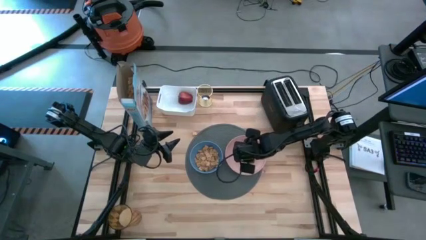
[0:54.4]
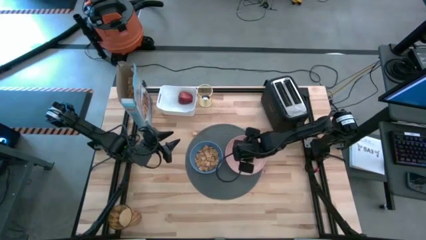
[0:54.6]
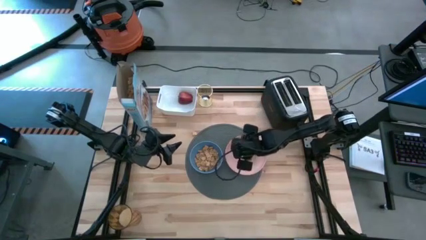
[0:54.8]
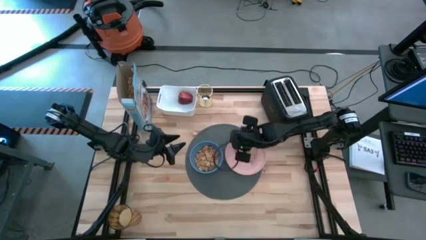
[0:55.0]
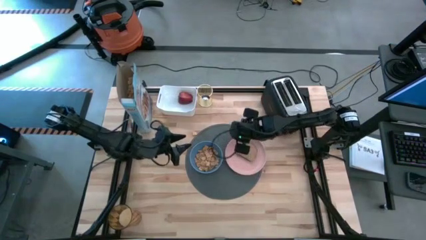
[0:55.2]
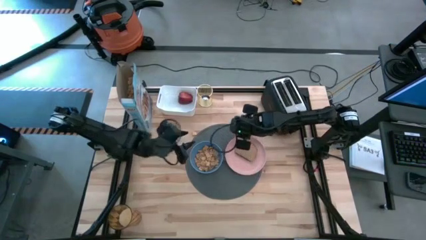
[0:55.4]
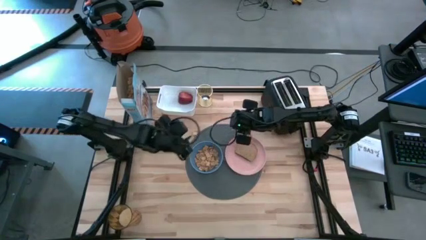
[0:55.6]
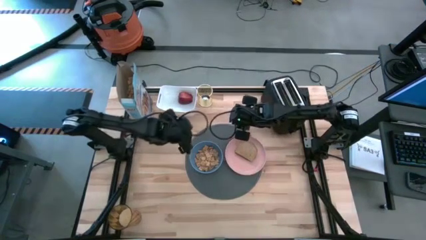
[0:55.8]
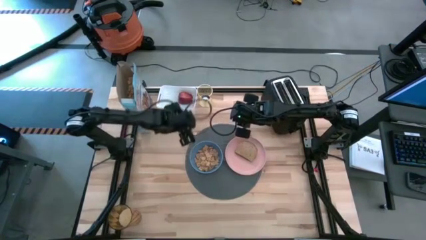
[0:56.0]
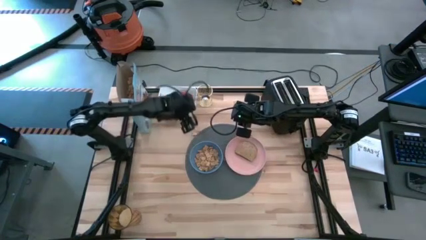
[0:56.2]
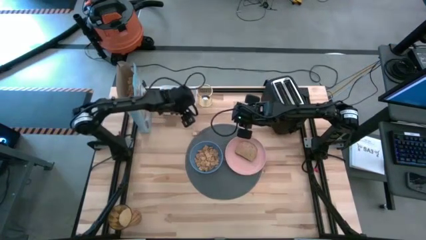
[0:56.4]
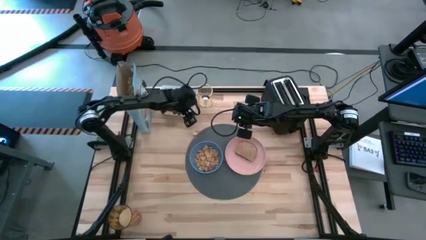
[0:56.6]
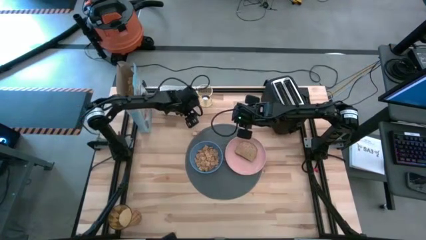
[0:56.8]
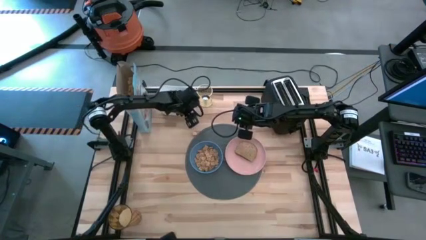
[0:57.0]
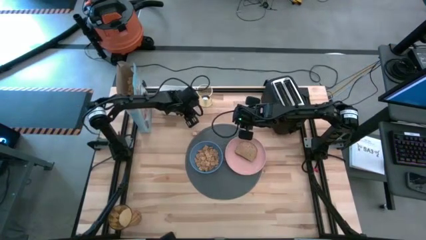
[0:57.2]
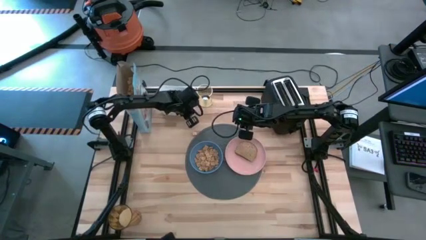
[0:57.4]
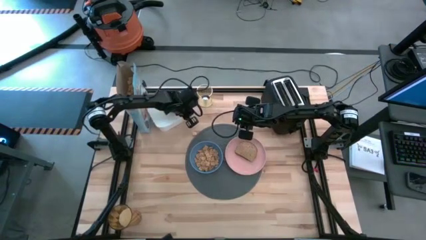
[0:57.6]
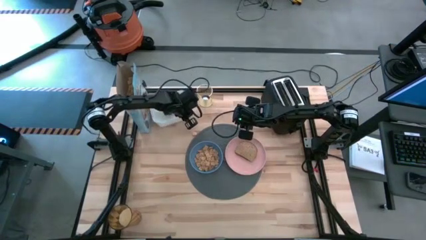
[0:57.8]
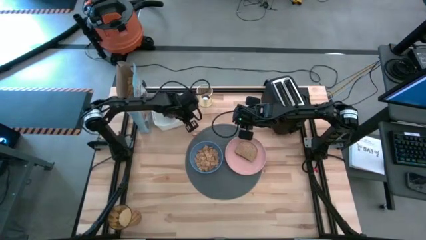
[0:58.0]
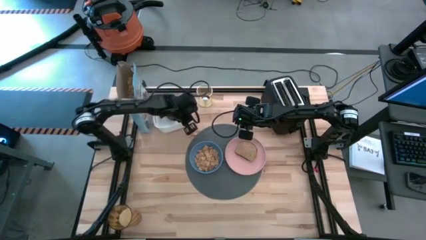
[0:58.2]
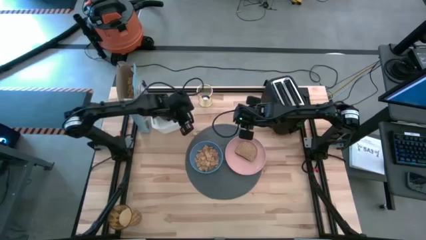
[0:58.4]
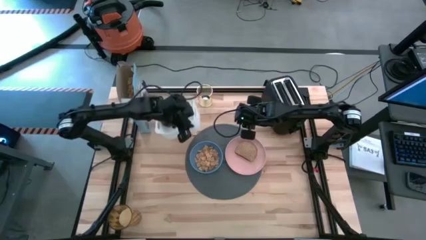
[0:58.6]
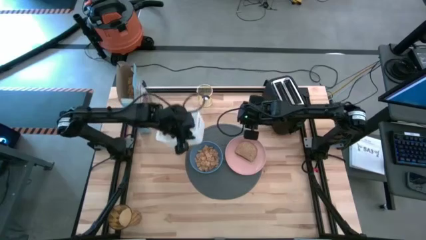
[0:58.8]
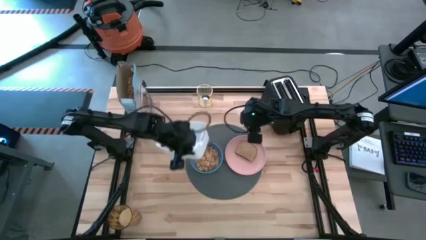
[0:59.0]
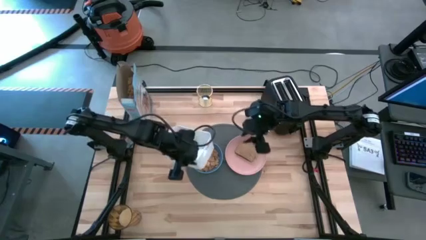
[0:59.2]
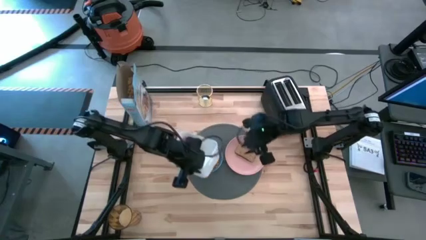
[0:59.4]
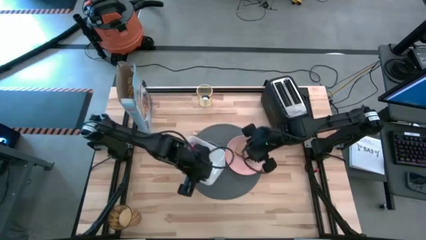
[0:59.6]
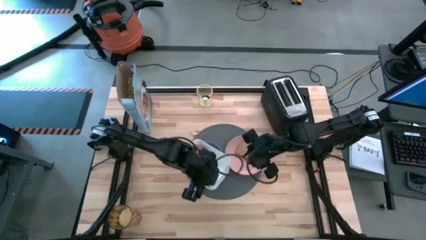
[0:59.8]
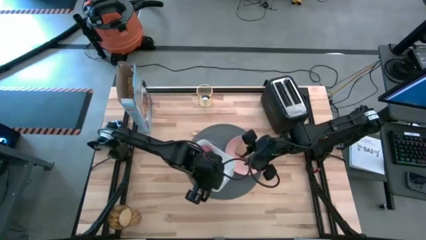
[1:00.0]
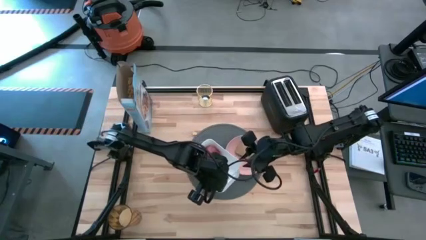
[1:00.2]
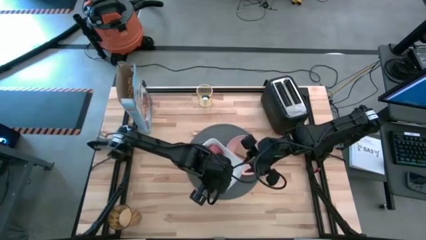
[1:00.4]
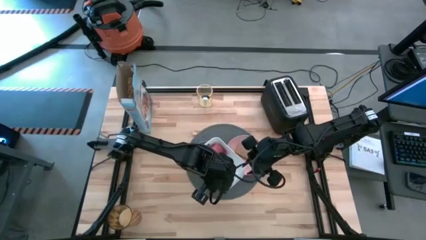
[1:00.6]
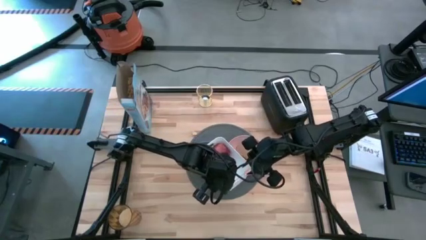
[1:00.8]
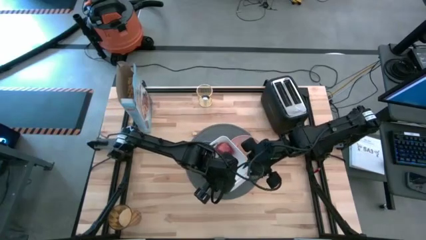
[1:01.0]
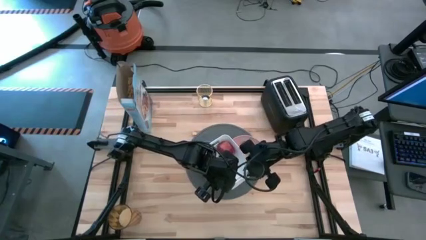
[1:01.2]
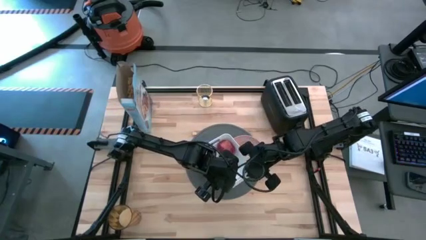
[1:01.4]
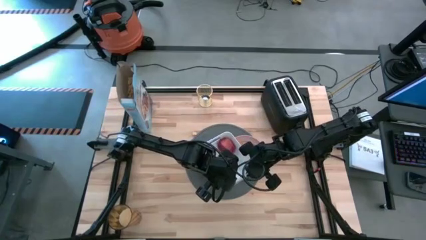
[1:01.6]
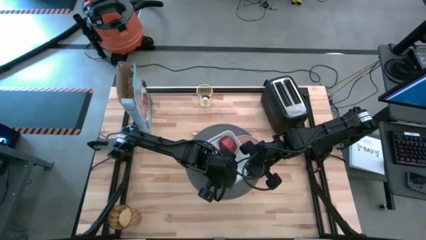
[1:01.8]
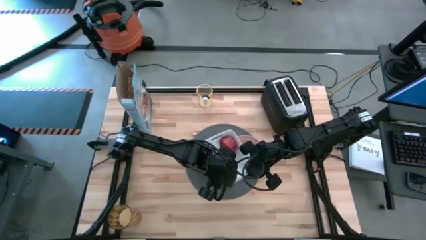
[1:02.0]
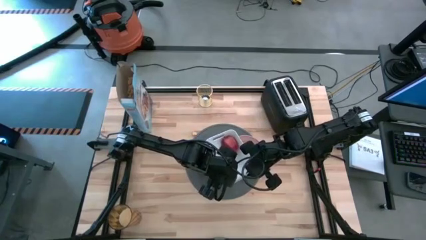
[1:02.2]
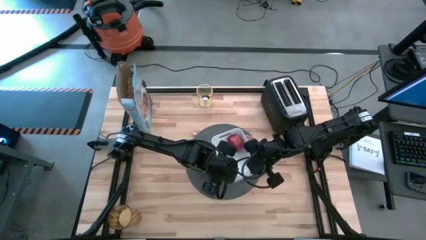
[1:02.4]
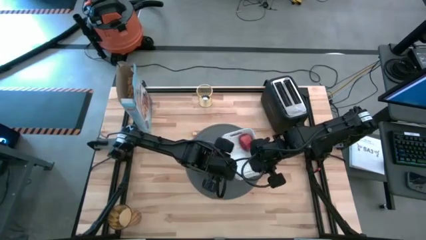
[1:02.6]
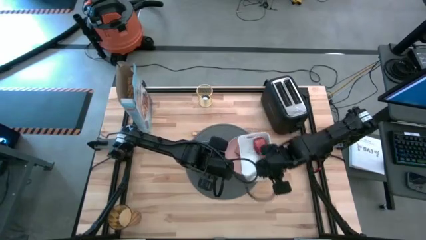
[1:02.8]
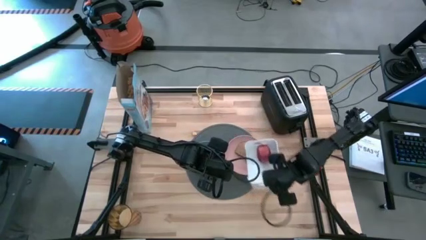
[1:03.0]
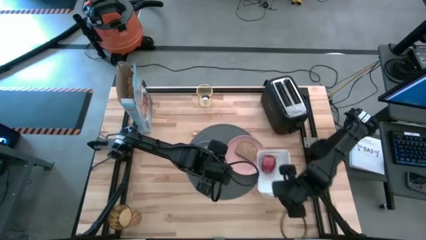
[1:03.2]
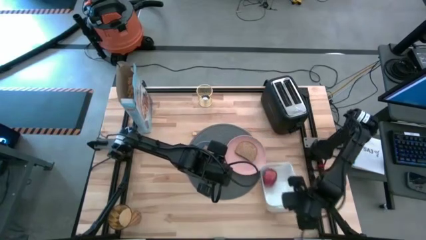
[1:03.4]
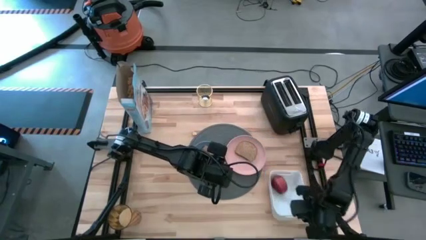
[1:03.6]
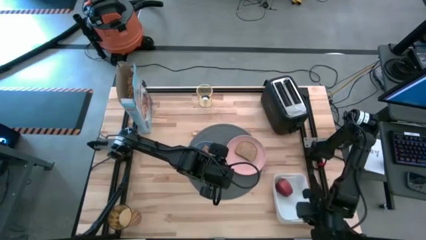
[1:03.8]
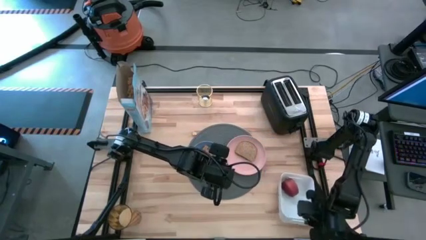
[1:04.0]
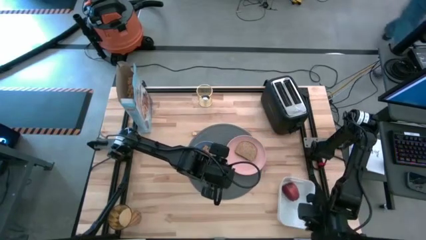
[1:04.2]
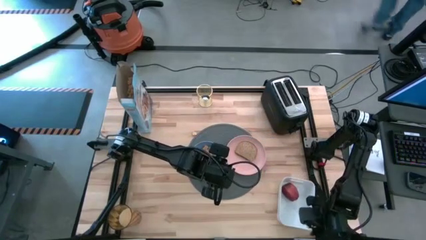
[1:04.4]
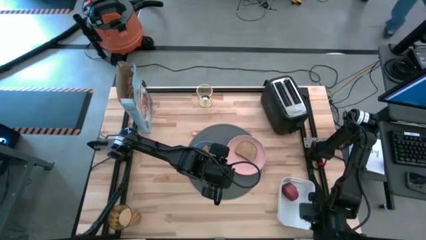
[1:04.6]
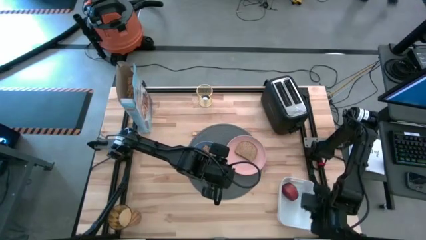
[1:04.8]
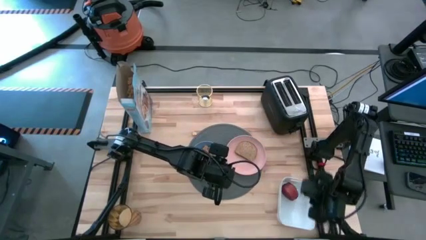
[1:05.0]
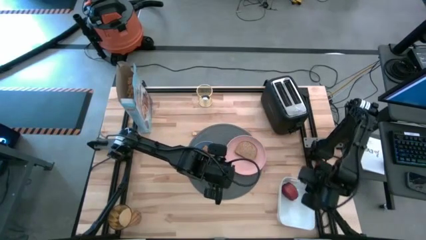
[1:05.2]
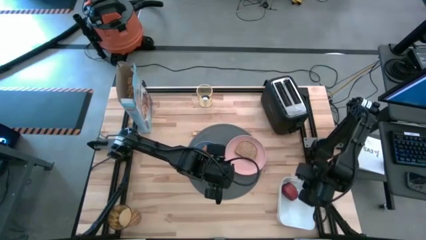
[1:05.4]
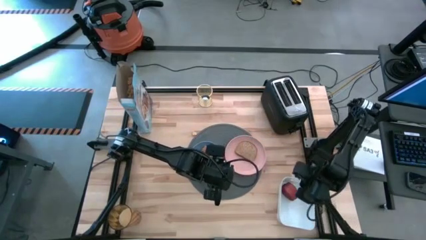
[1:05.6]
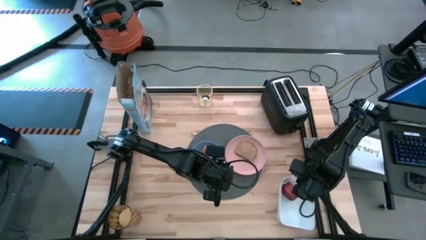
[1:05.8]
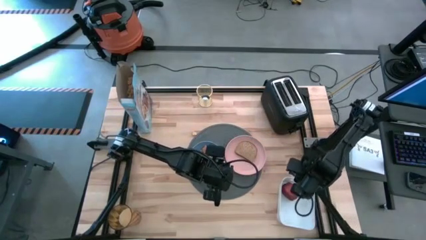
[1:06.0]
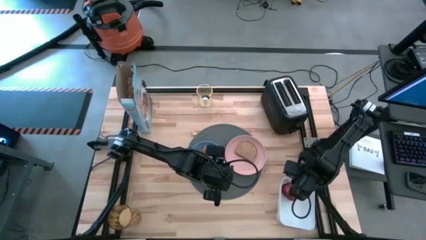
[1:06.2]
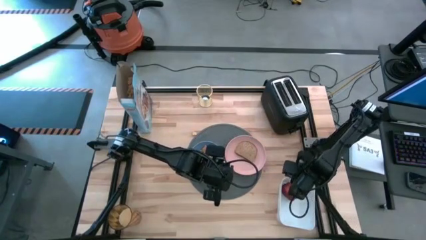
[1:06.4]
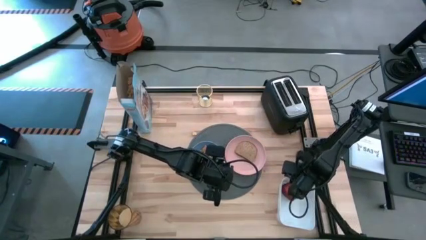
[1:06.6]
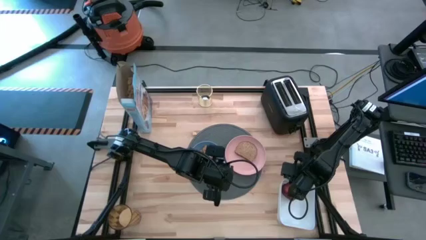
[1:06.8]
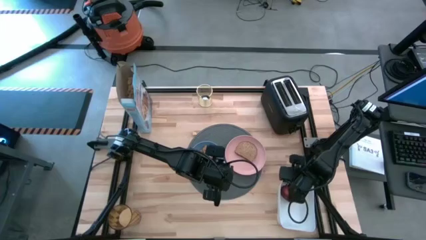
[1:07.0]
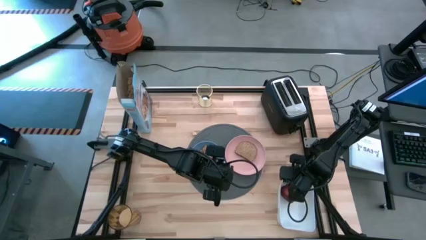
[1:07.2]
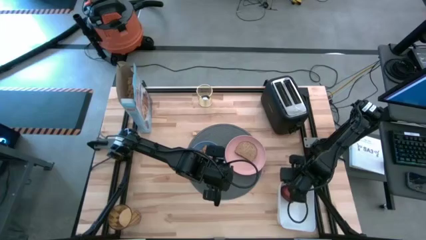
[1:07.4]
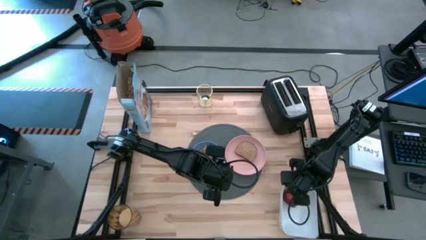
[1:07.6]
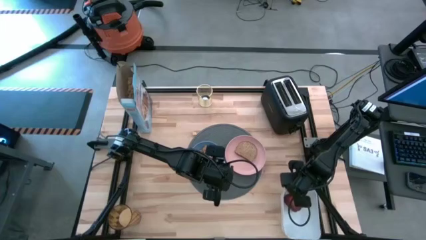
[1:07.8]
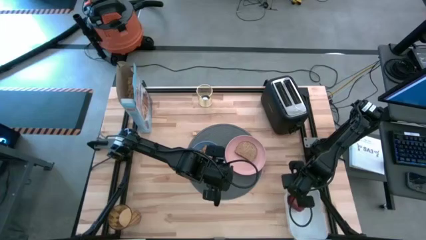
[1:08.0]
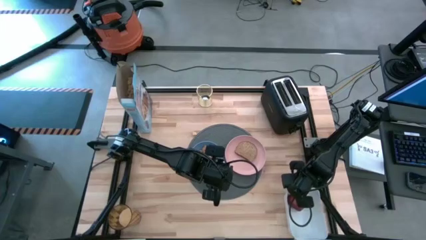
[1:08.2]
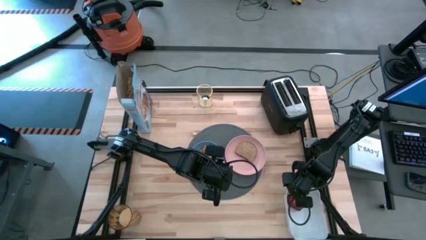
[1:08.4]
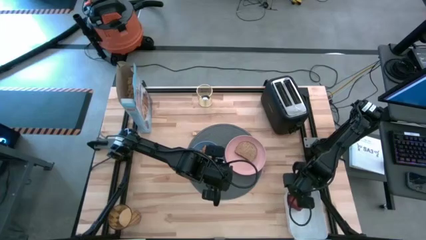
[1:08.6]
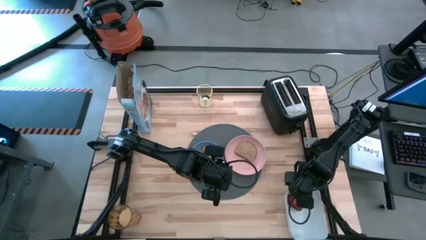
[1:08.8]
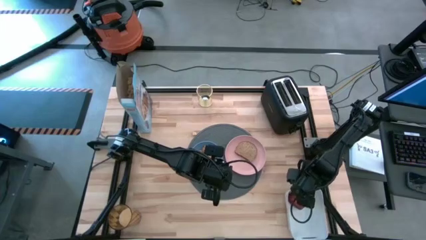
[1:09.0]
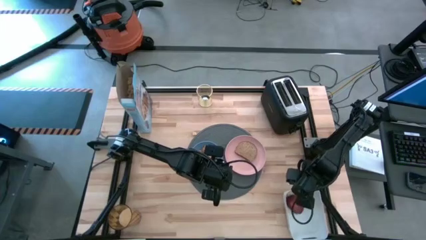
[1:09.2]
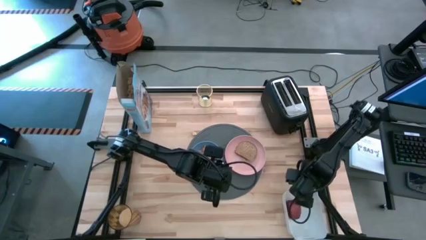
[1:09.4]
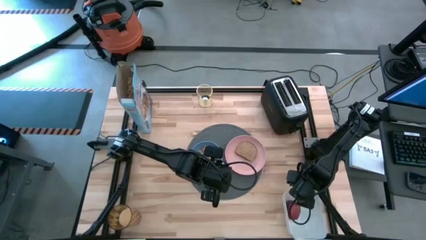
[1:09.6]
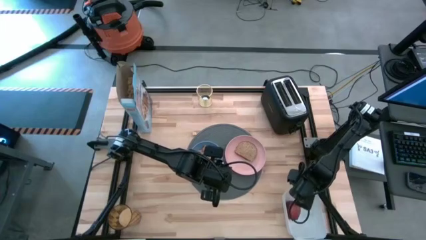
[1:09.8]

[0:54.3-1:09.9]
Task: Arrange a breakfast setting
Move the white bin to the bottom right of the table
